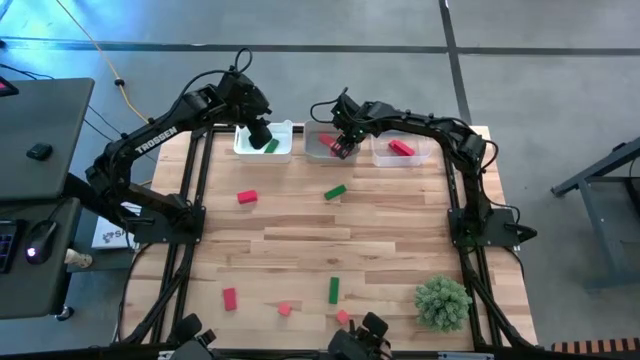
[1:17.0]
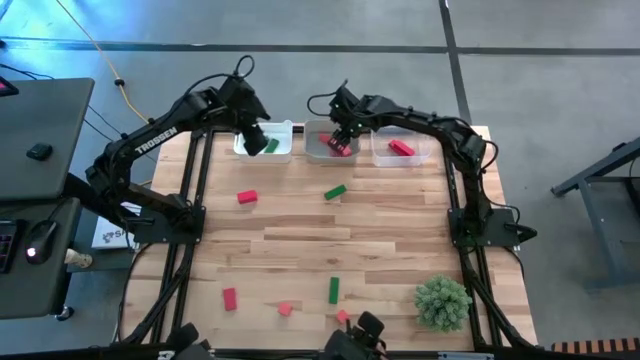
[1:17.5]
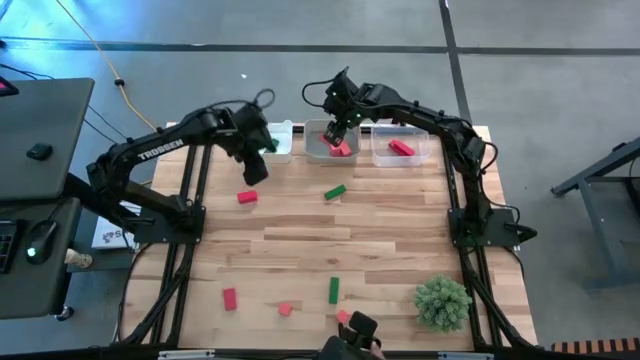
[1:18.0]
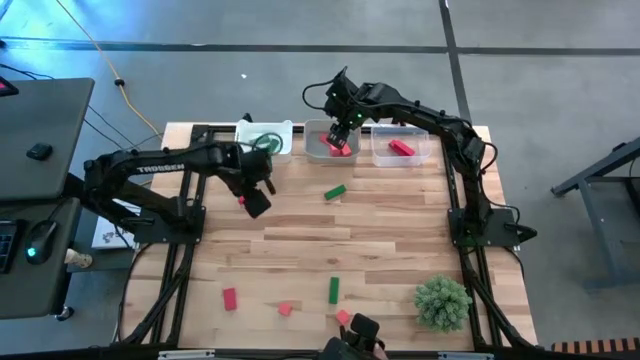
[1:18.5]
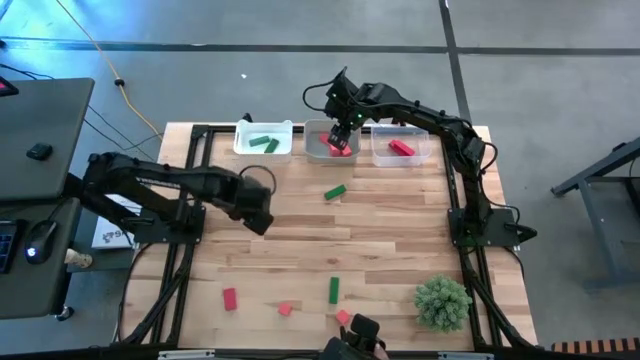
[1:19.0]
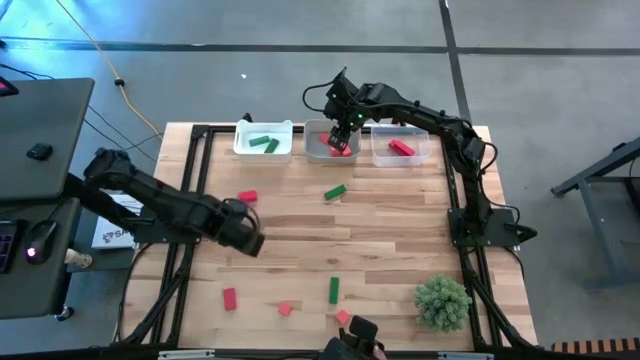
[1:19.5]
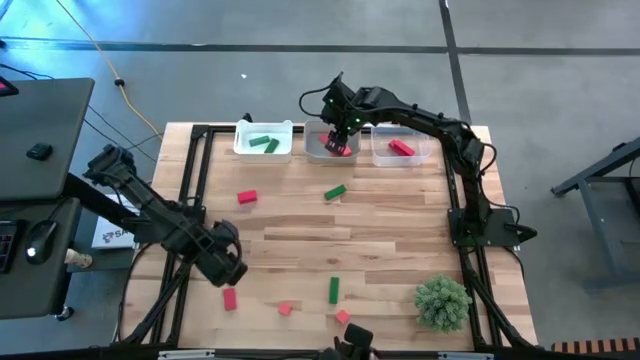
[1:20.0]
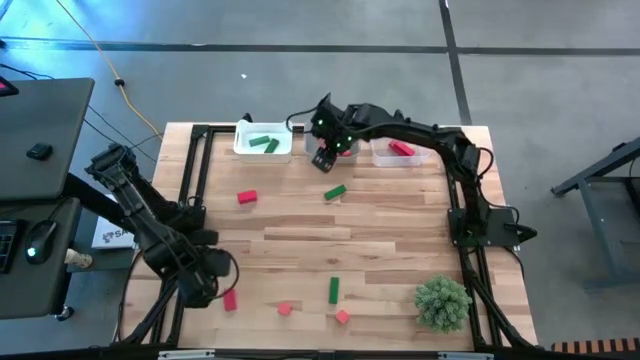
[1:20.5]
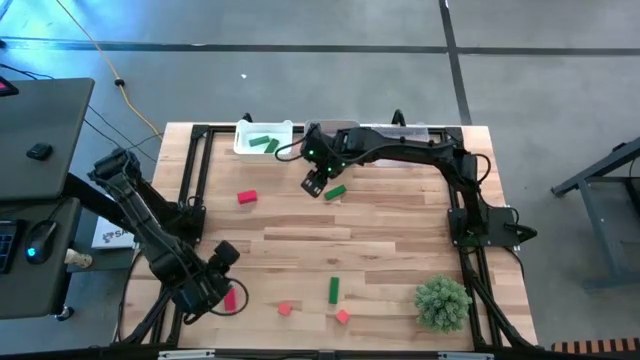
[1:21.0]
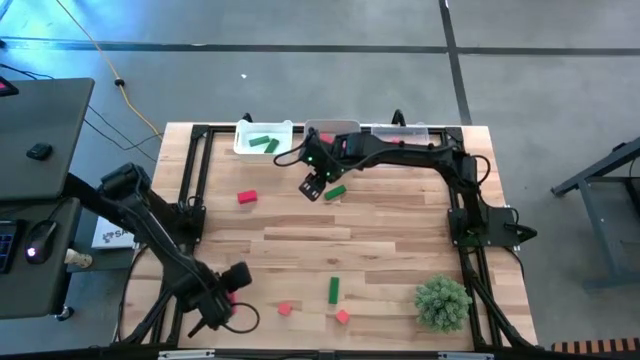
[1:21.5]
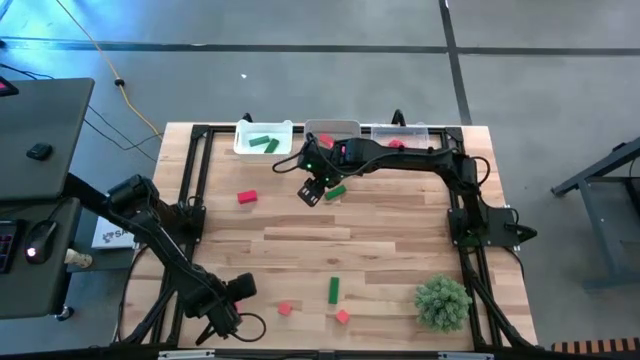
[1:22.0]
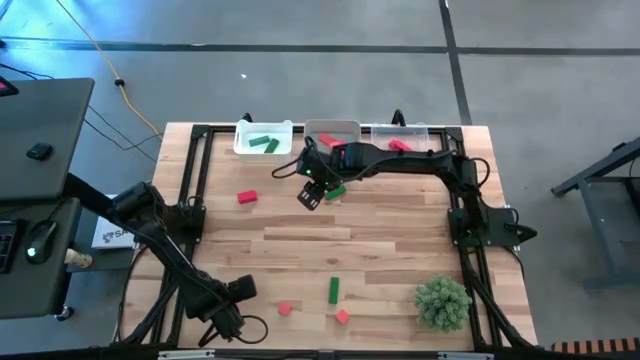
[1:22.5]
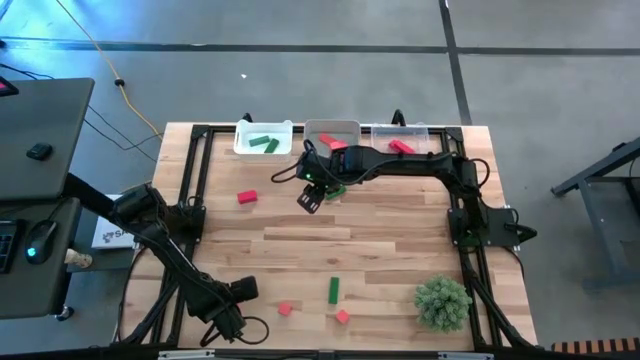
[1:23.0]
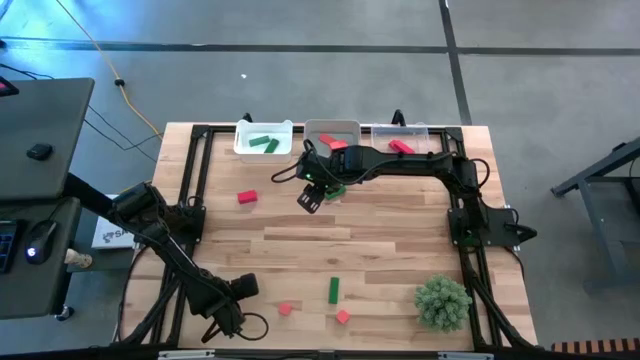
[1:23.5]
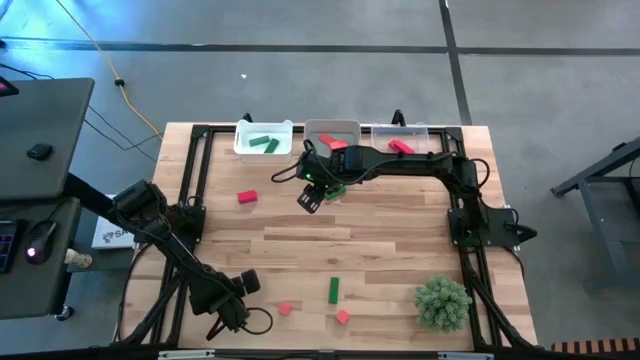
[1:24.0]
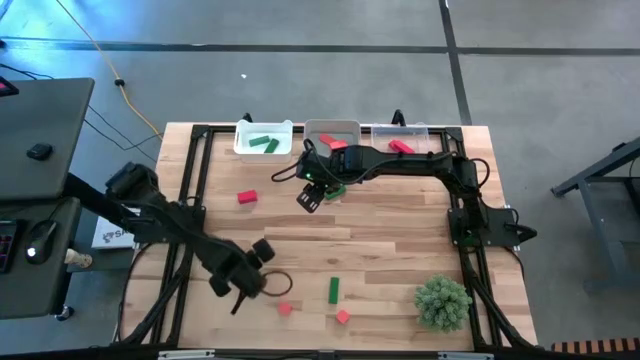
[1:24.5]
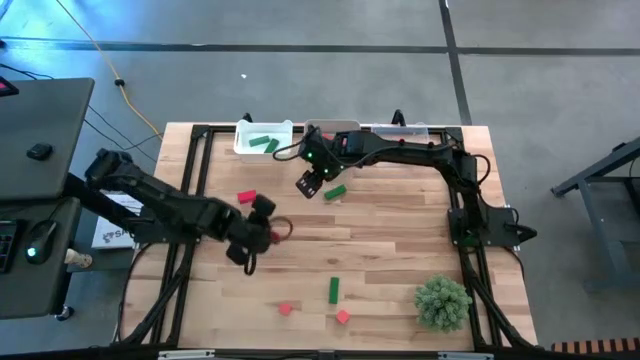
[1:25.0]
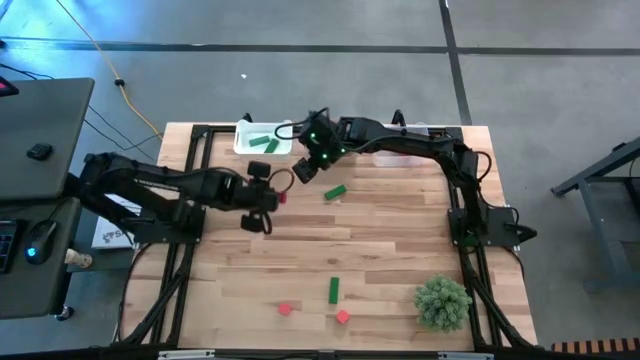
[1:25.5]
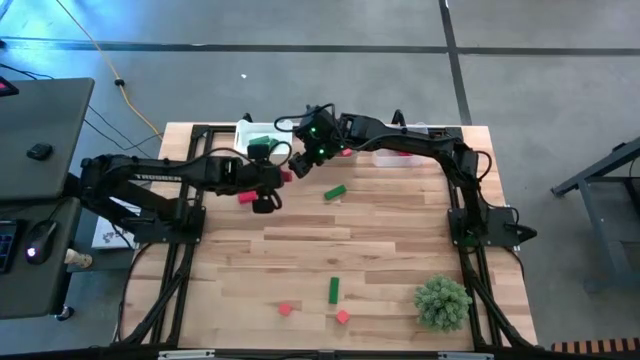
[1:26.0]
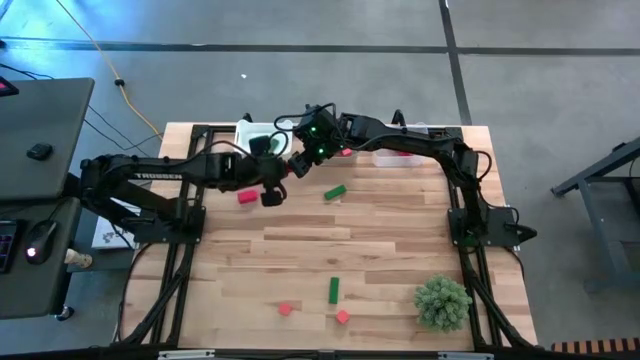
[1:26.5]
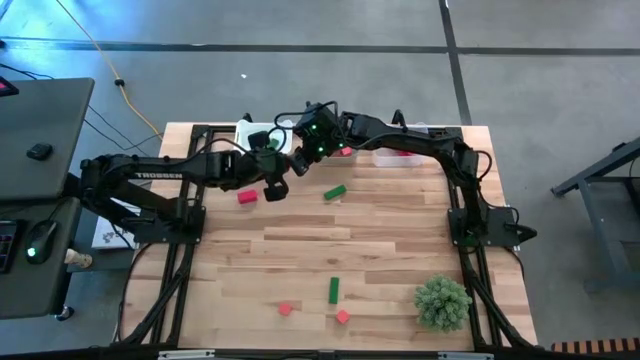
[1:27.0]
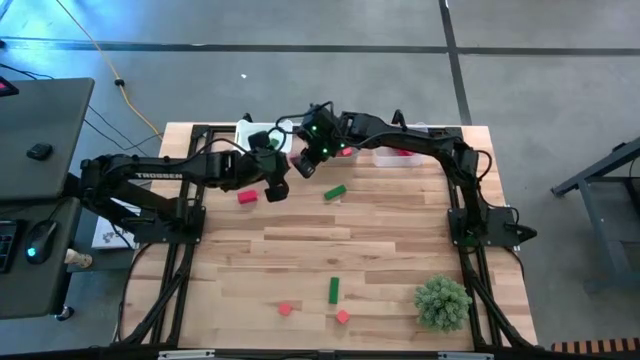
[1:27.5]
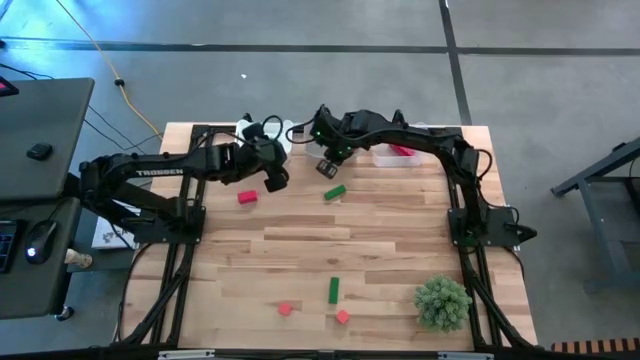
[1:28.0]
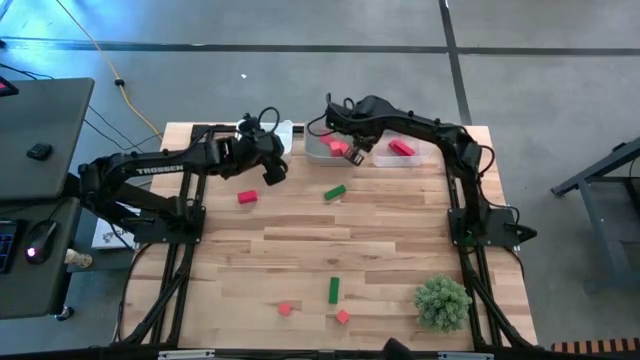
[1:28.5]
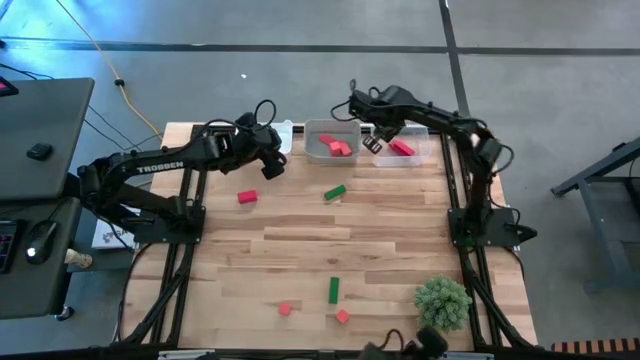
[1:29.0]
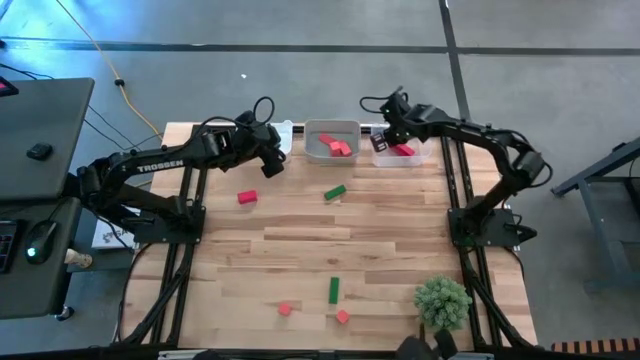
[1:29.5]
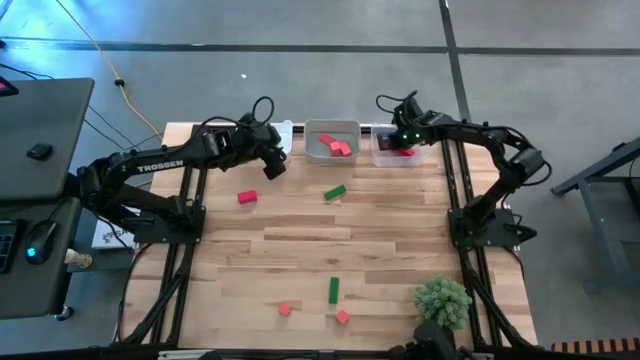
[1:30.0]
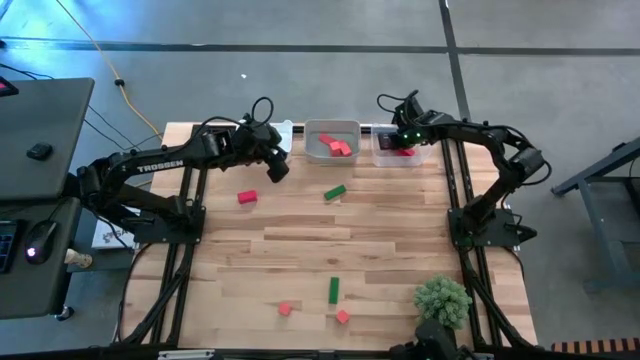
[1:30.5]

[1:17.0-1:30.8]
Task: Sort & place blocks by color
Put the red wooden block into the transparent bin

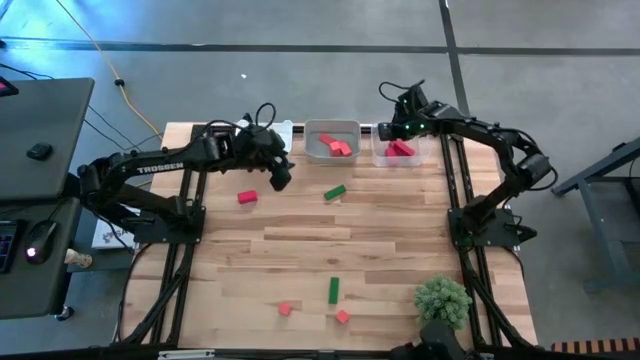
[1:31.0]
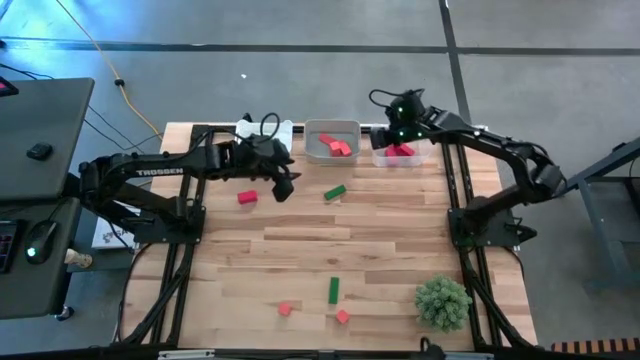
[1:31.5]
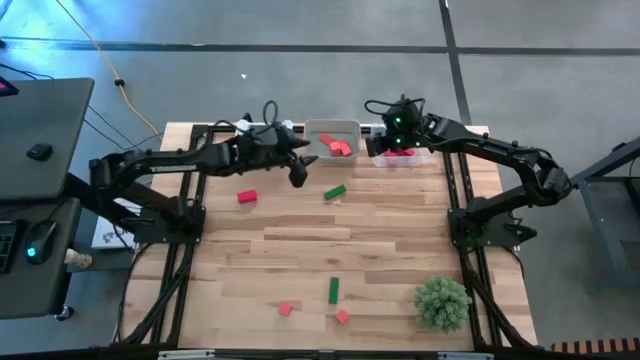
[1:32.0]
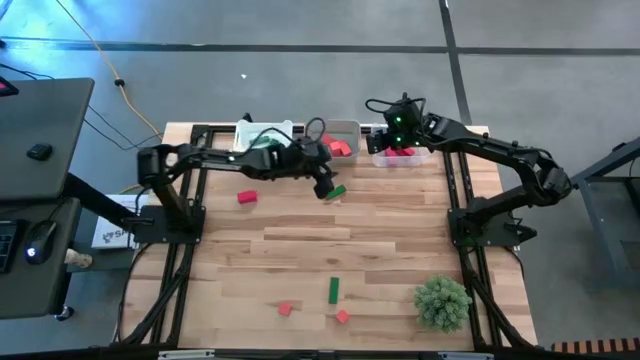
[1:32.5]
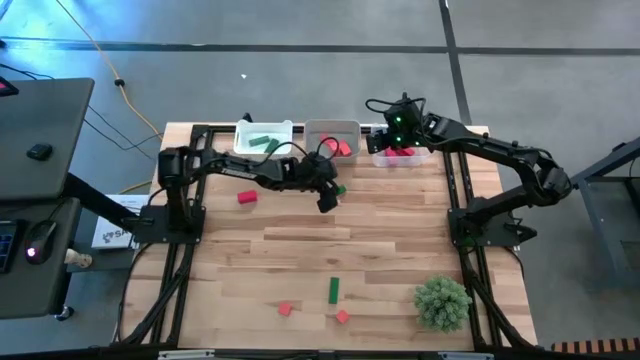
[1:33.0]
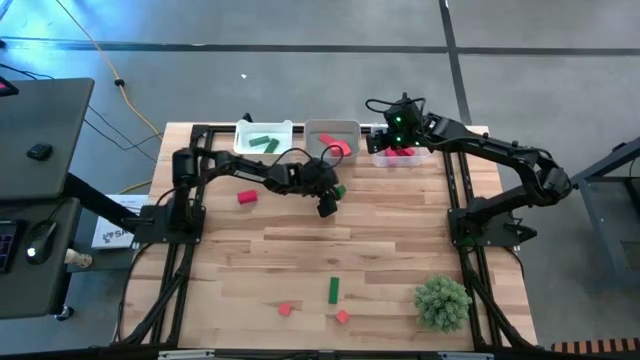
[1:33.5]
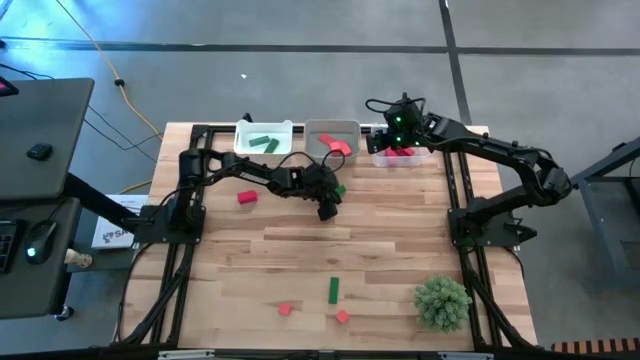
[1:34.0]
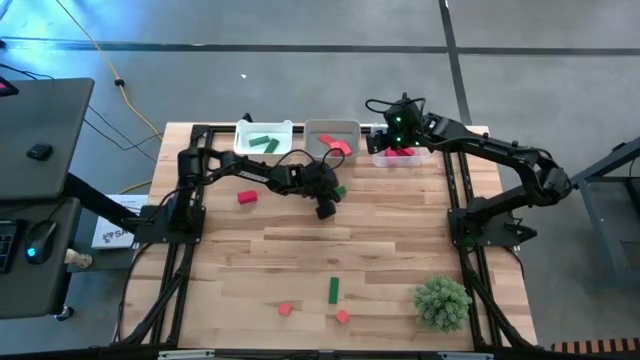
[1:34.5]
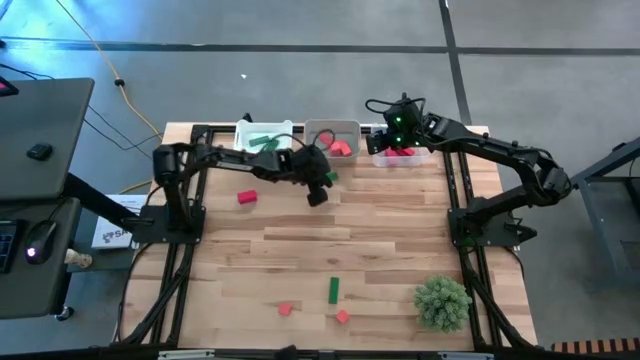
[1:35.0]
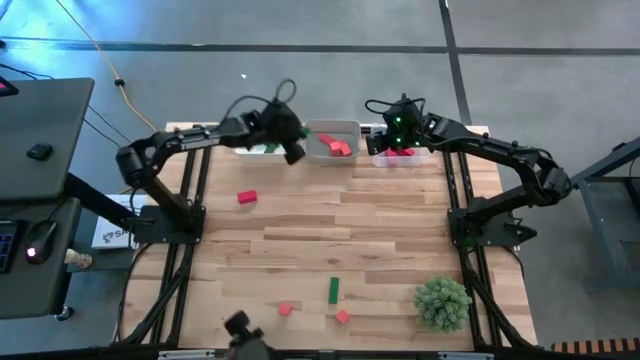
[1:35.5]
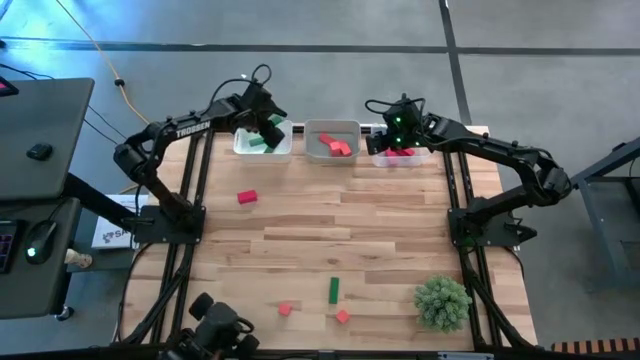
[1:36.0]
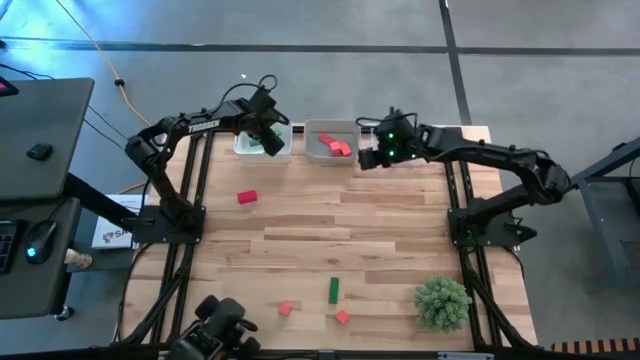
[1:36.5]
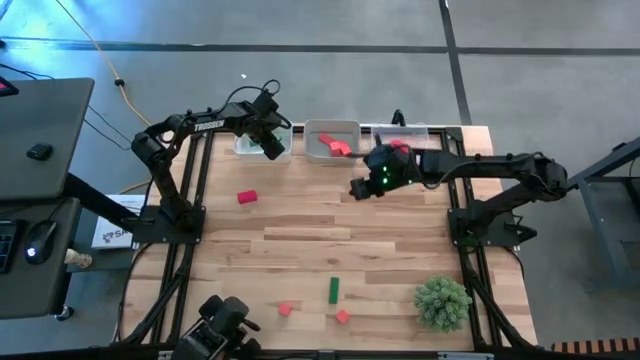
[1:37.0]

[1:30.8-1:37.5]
Put the green wooden block into the white bin

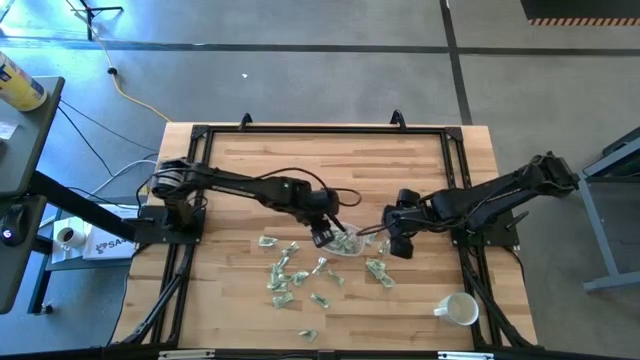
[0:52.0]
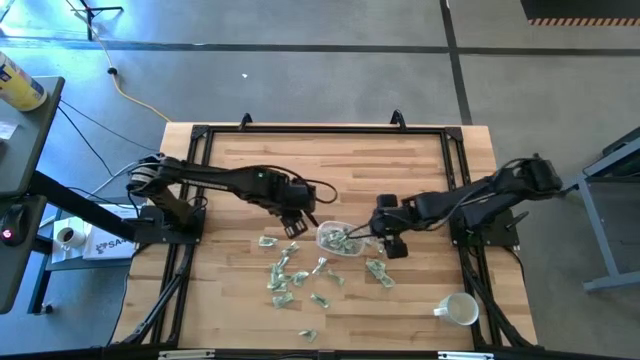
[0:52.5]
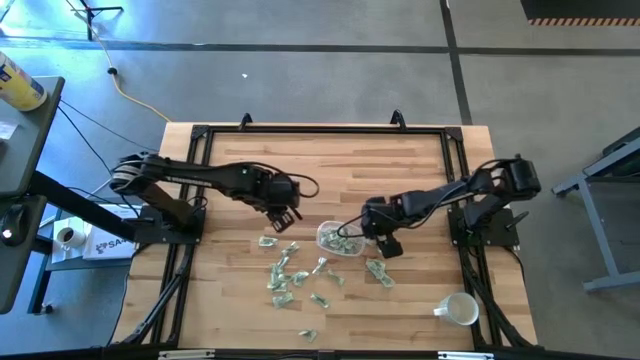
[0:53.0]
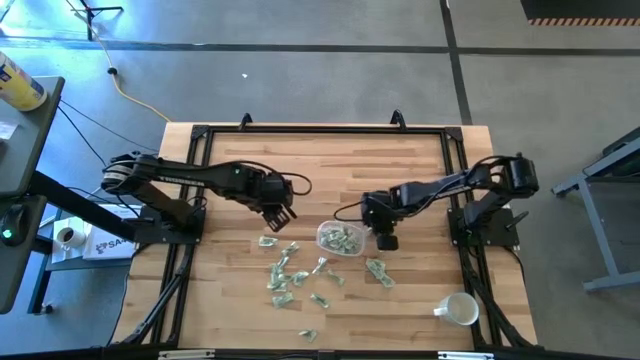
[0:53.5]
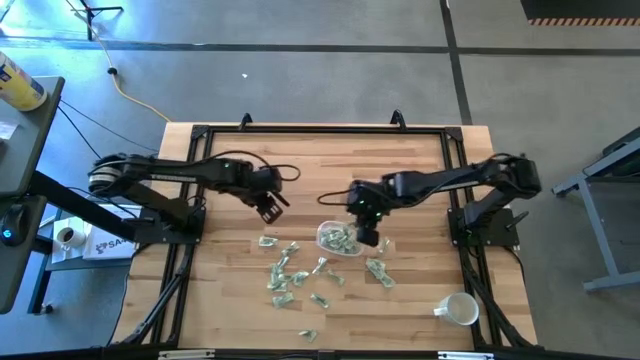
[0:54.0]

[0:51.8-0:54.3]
Task: Pick and place Stevia / Truvia into bins
Put the green stevia packet into the transparent container
